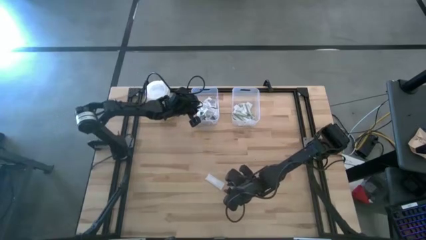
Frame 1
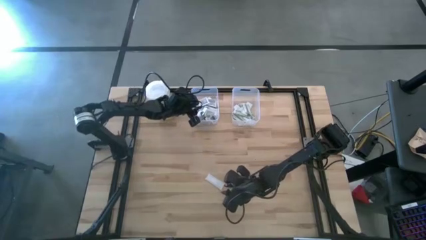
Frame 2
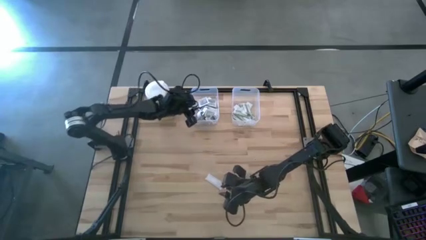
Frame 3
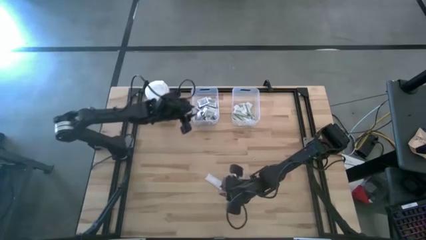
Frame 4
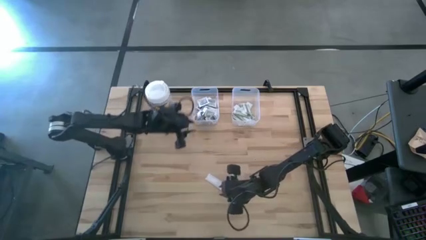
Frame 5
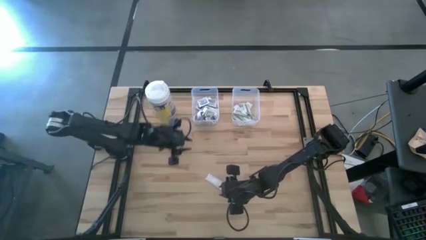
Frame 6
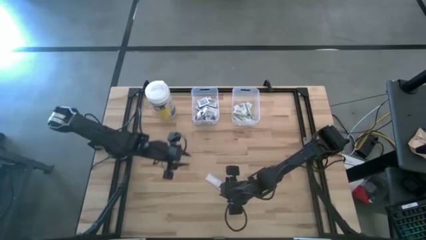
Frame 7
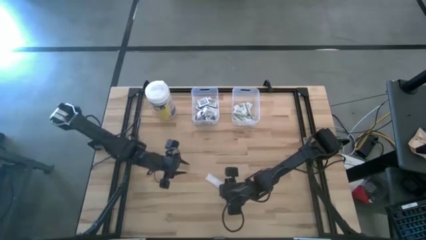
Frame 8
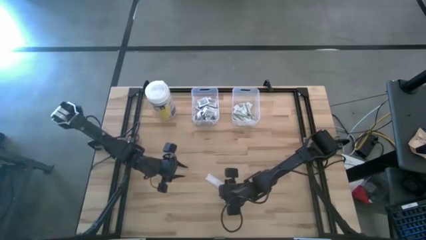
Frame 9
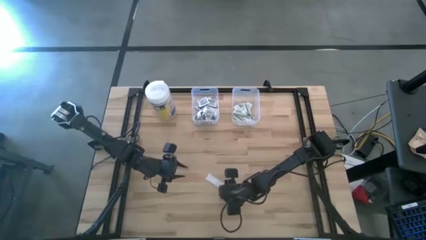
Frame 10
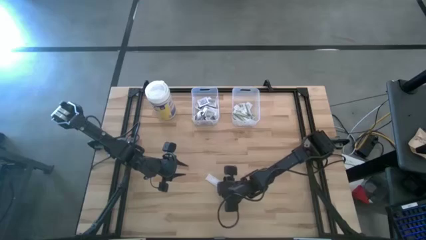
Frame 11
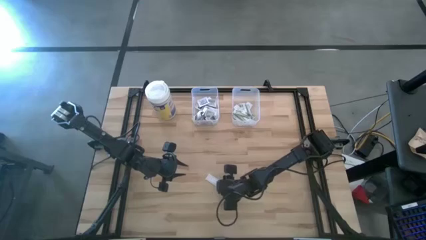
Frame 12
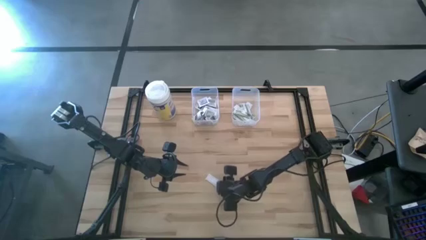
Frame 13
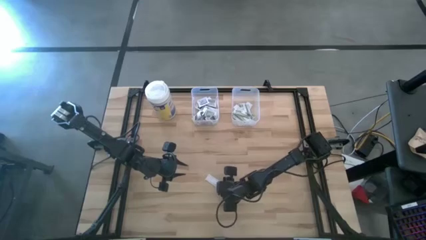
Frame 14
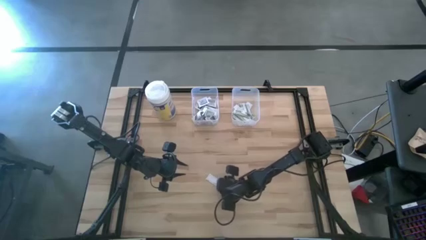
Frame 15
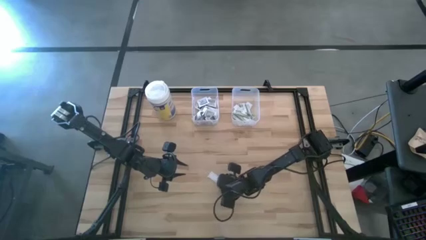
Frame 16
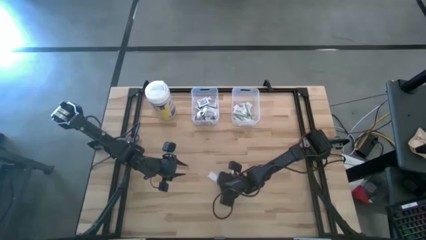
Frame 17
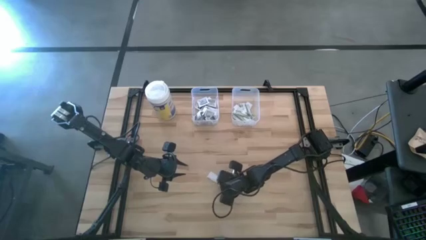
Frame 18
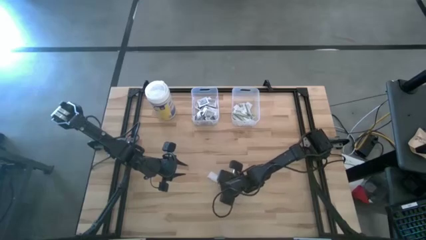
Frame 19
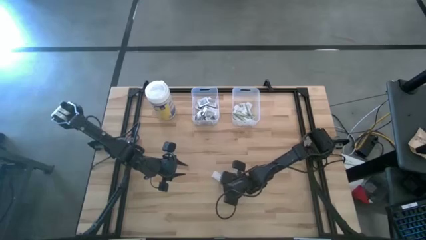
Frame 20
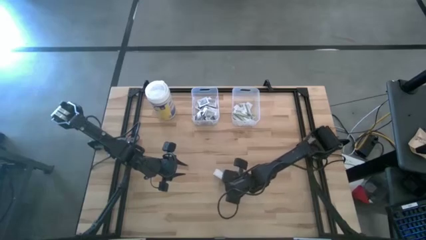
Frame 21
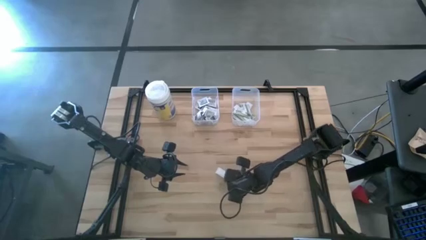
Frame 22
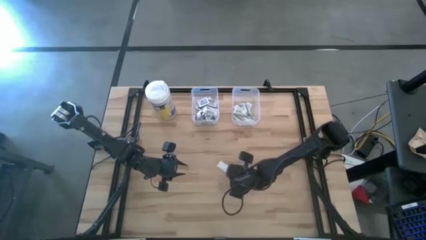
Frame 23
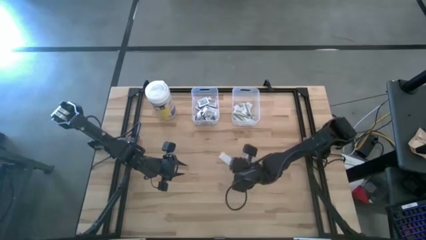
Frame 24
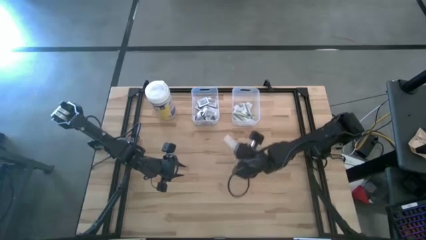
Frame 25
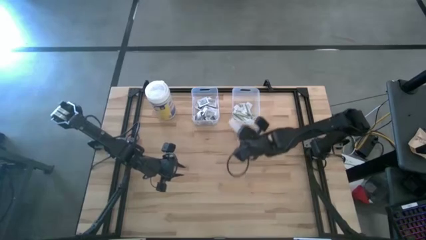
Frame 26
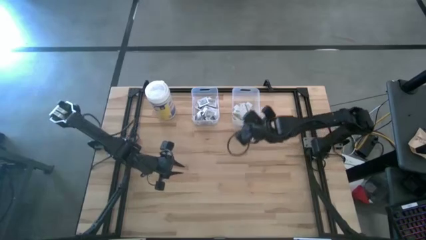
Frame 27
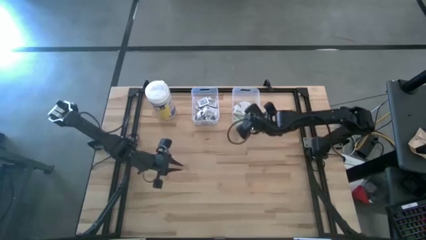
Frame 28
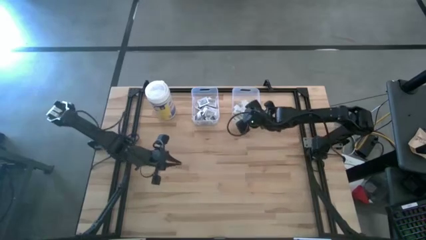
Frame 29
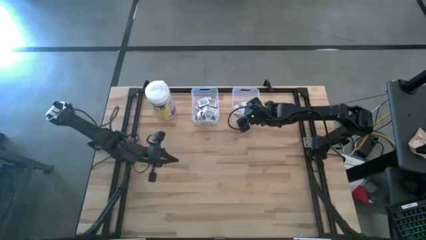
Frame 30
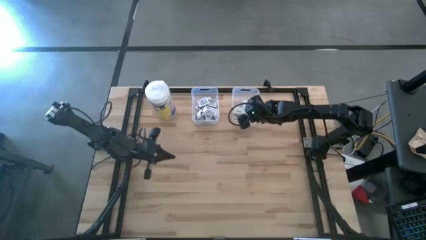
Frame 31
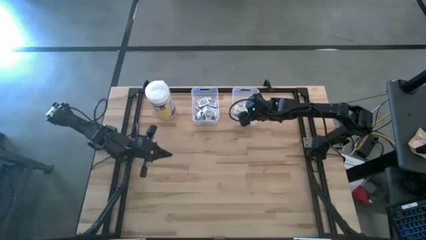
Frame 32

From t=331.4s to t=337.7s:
Task: Pick & Place First Aid Supplies
Put the bandage into the right transparent bin

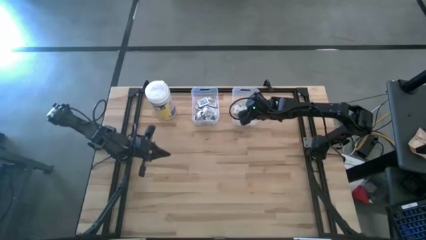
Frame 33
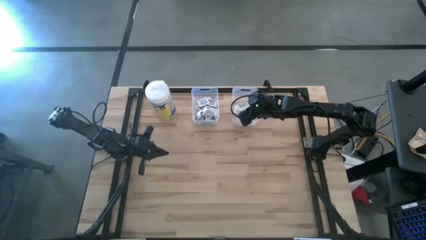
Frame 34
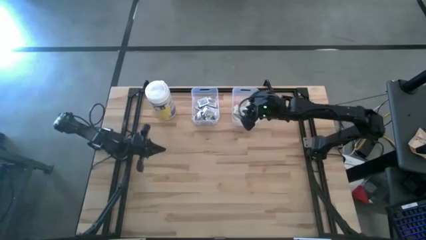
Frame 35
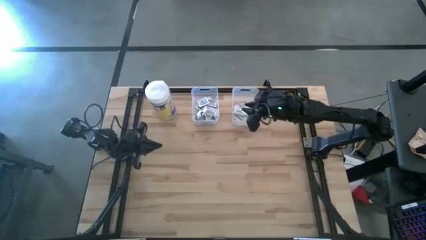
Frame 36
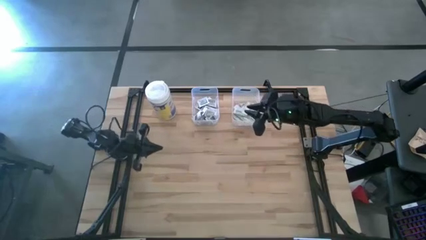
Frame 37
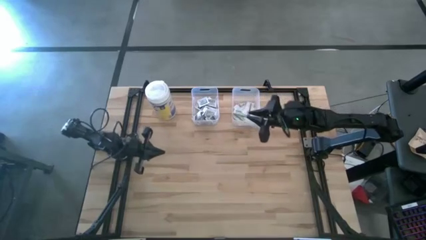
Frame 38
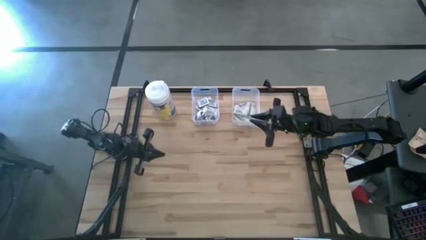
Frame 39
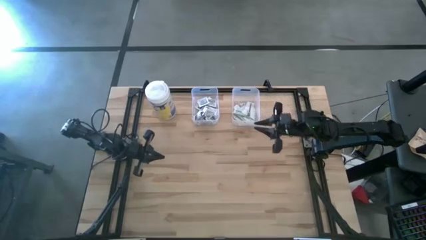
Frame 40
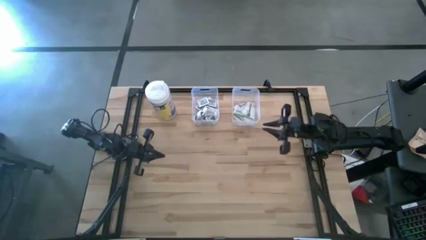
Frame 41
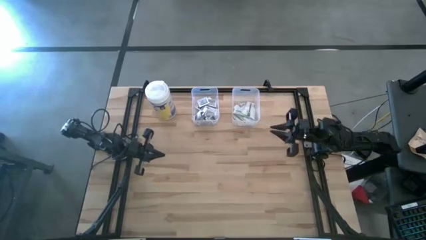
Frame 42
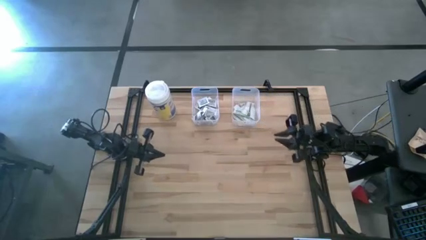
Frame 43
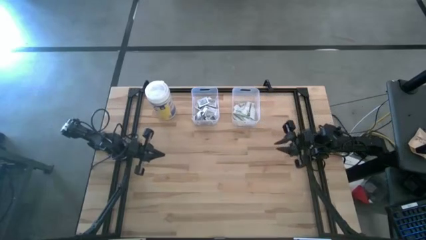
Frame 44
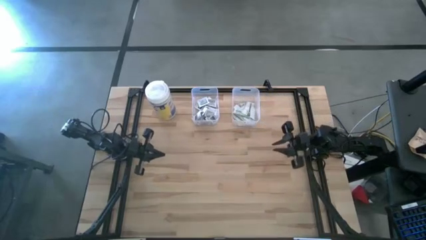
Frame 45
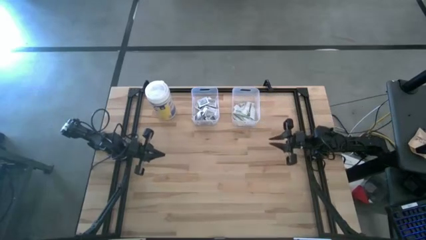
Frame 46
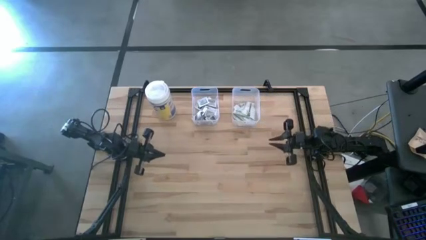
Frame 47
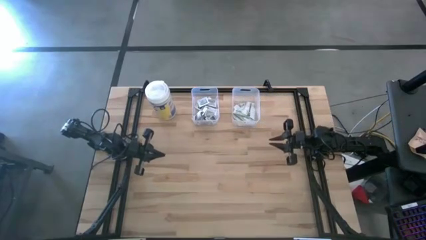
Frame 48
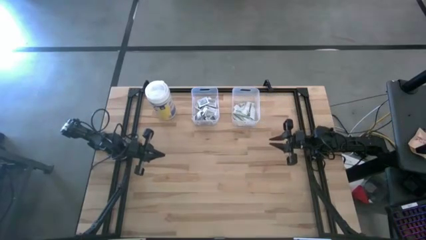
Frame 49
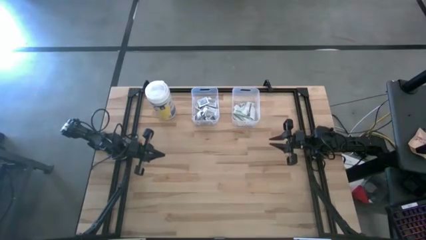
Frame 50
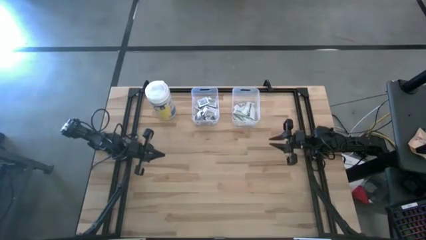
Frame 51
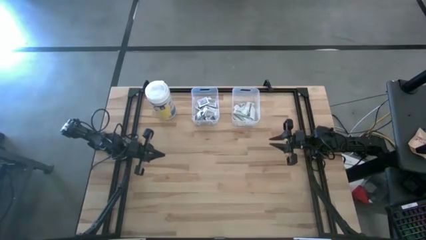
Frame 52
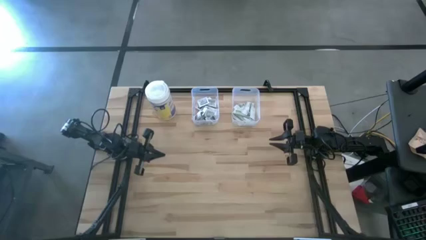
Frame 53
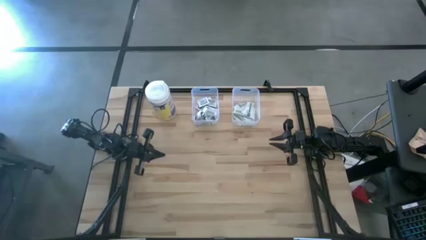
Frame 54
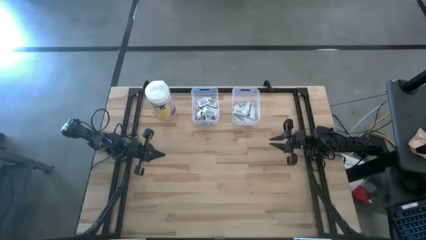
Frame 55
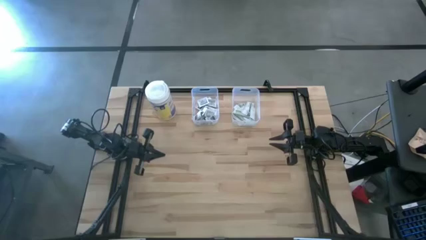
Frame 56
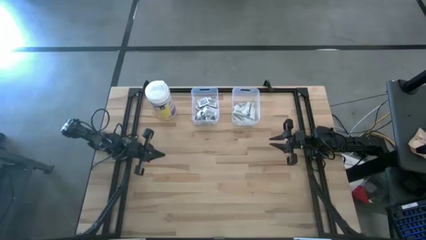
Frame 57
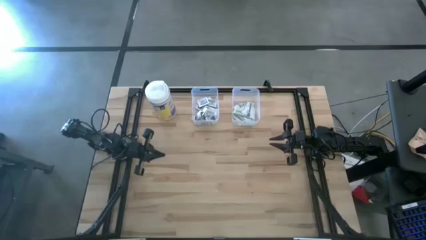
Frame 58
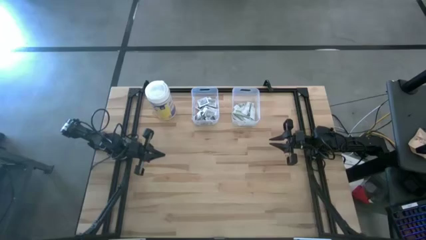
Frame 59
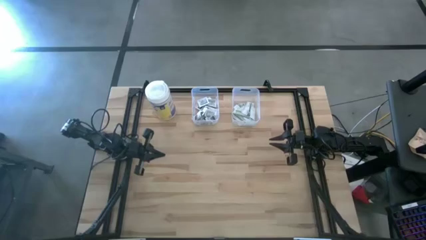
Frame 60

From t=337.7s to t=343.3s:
Return to Home Position

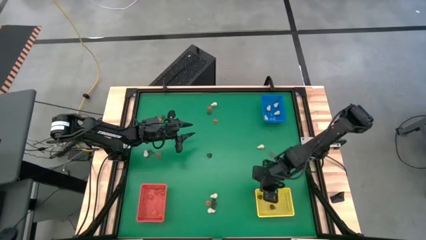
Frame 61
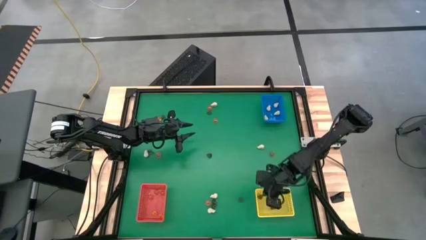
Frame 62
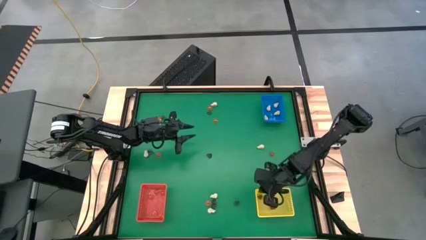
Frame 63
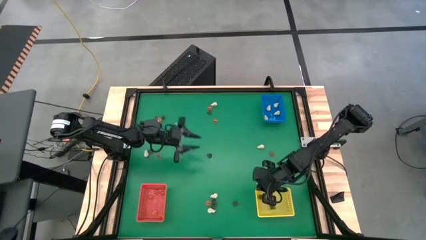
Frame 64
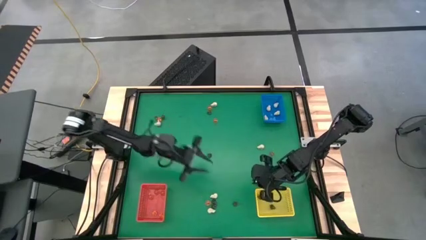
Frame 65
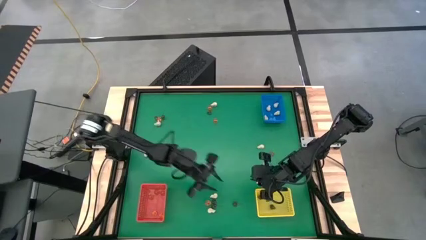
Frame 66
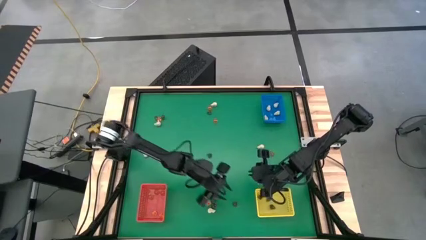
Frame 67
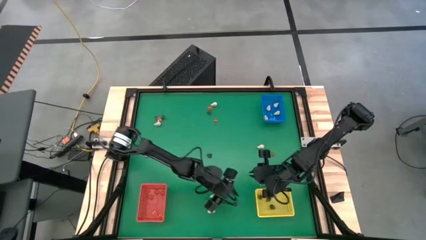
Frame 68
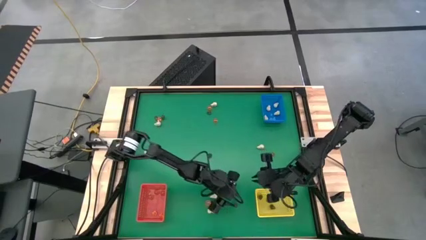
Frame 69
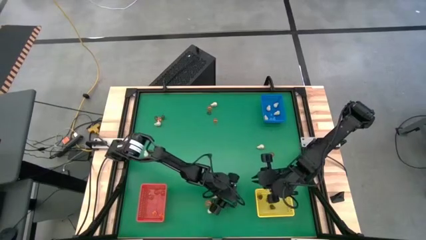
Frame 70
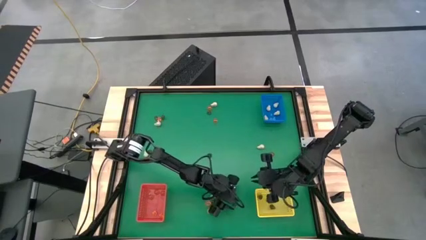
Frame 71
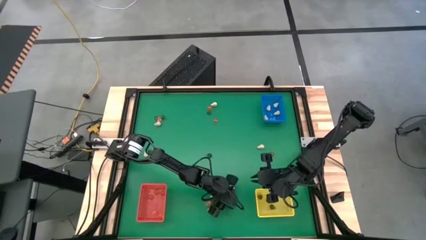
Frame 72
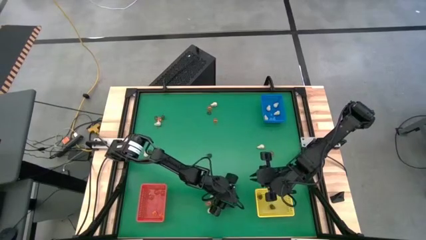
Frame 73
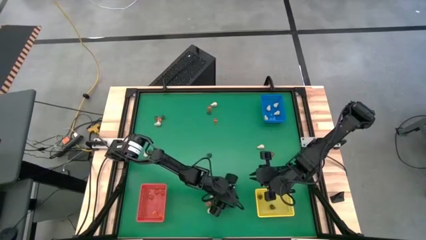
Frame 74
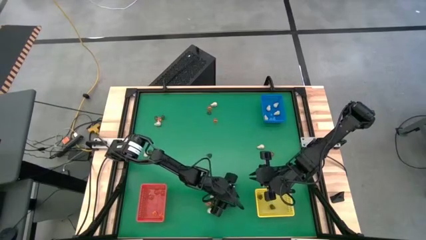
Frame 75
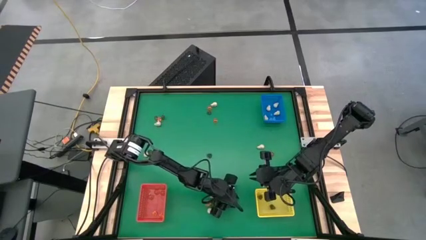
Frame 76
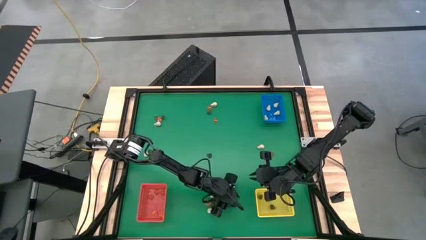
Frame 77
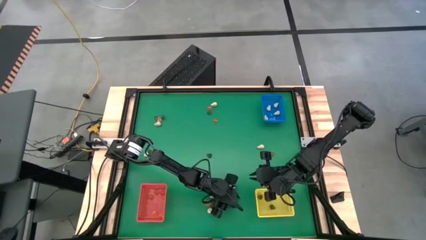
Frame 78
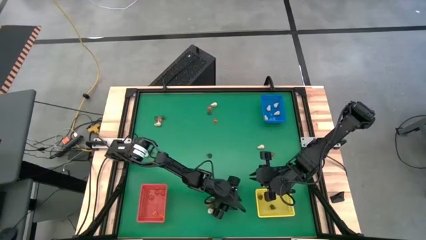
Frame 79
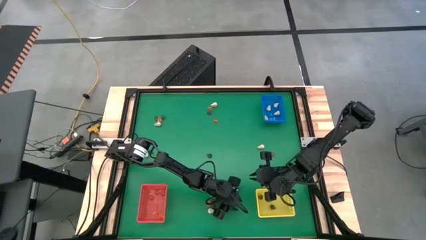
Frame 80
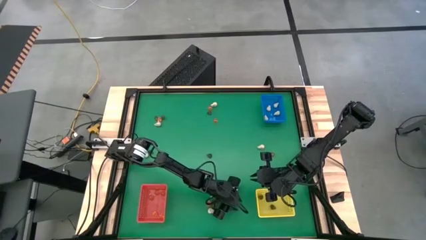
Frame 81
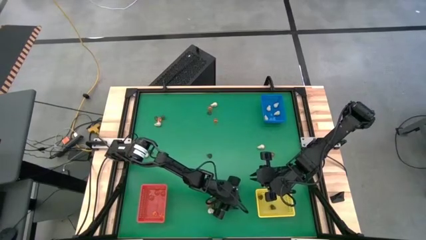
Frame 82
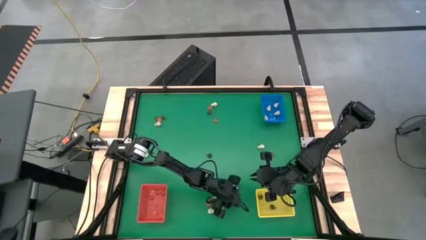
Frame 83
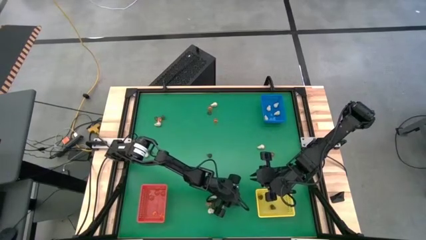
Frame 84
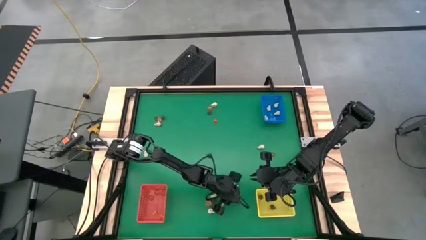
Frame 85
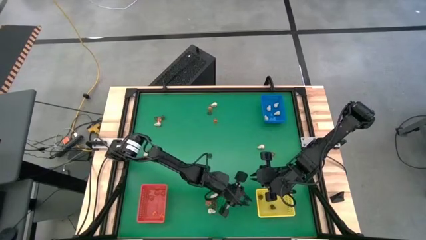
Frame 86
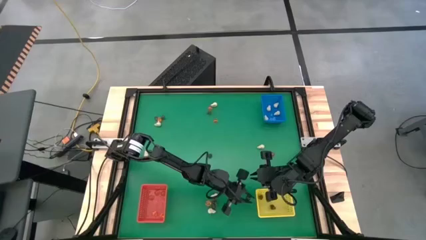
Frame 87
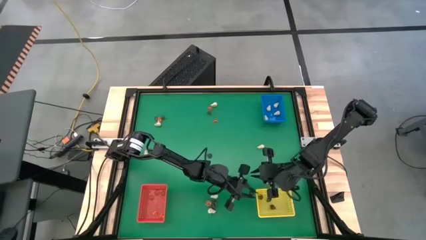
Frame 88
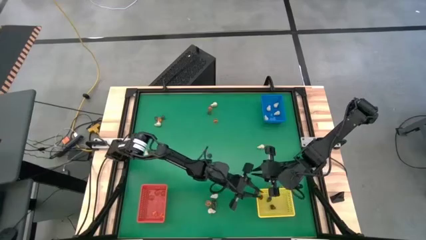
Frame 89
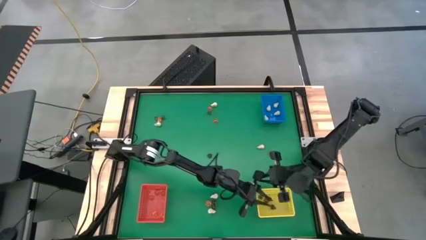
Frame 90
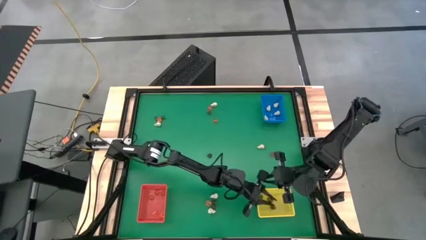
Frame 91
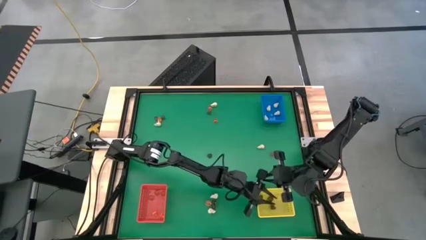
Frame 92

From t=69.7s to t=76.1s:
Task: Sort Halloween decoration
Put the black skull toy into the yellow bin
